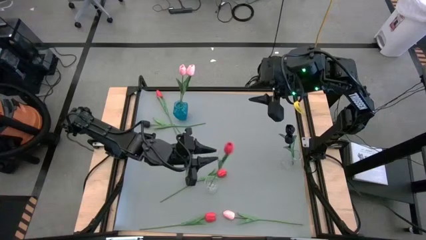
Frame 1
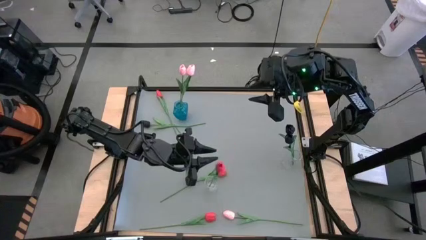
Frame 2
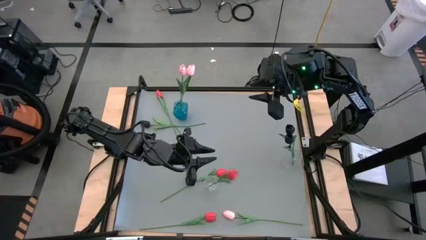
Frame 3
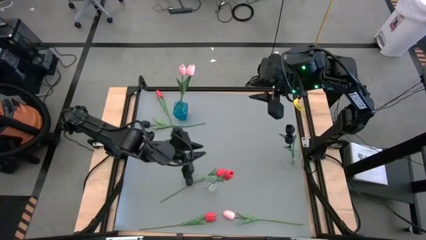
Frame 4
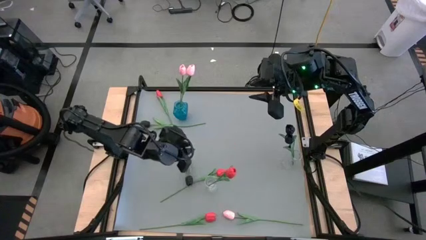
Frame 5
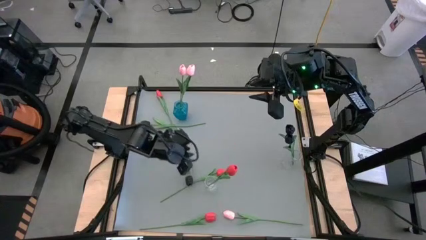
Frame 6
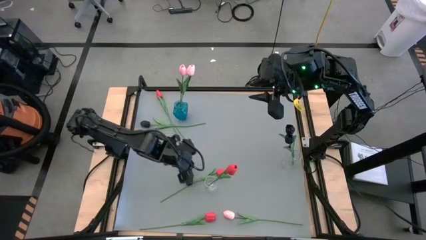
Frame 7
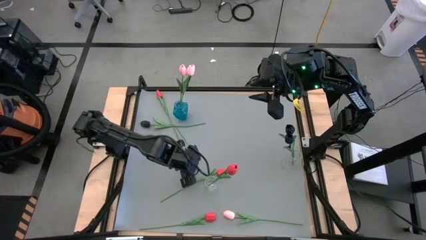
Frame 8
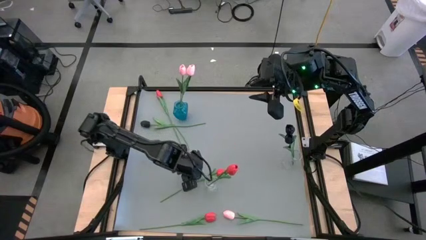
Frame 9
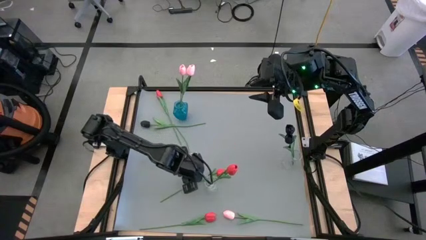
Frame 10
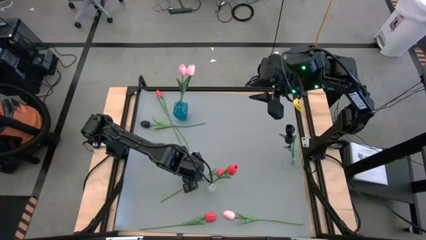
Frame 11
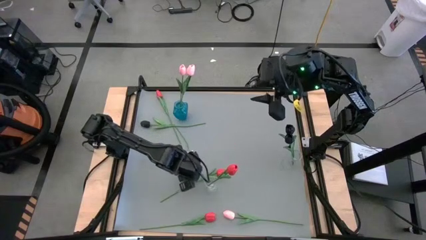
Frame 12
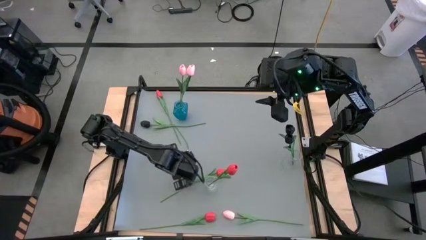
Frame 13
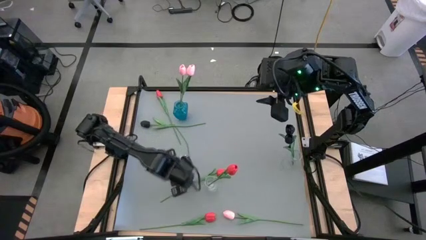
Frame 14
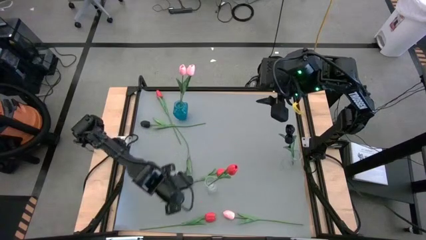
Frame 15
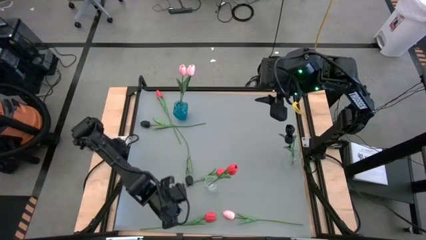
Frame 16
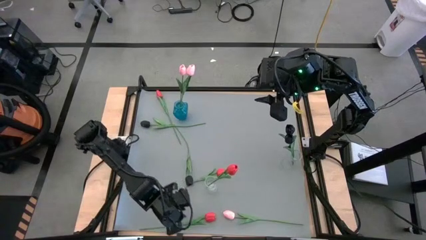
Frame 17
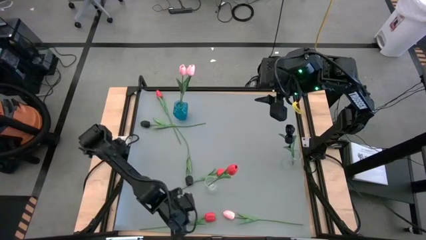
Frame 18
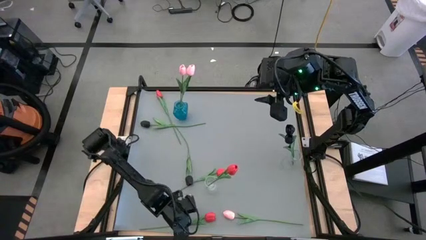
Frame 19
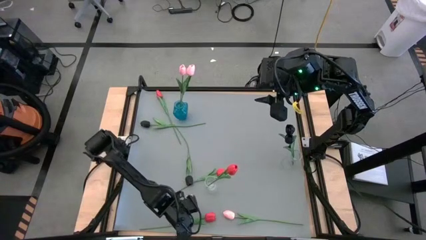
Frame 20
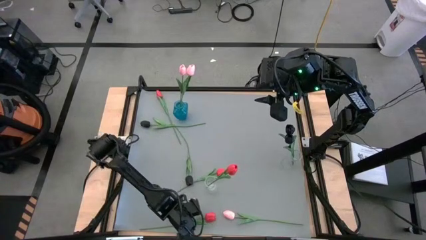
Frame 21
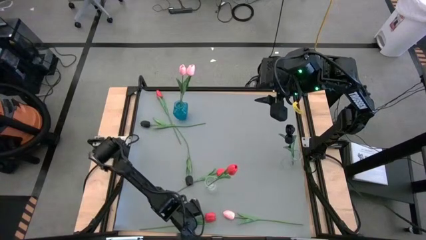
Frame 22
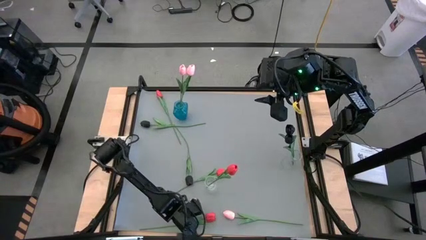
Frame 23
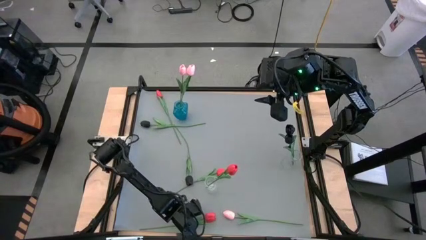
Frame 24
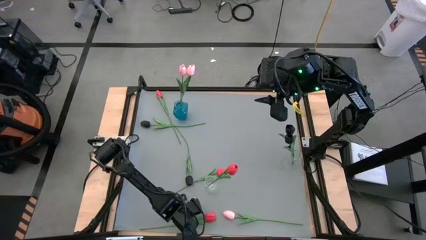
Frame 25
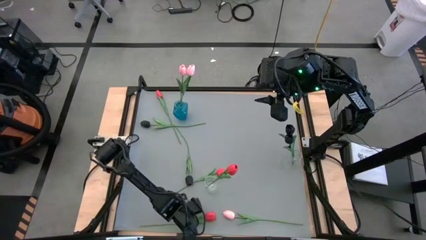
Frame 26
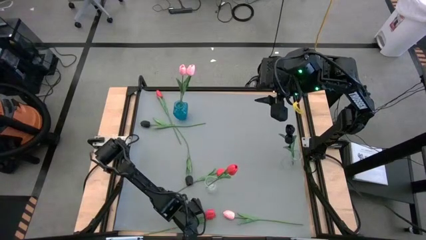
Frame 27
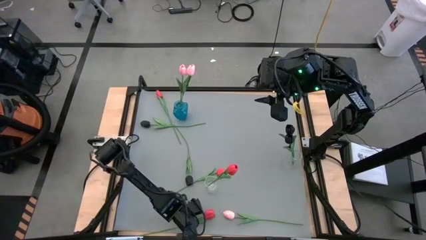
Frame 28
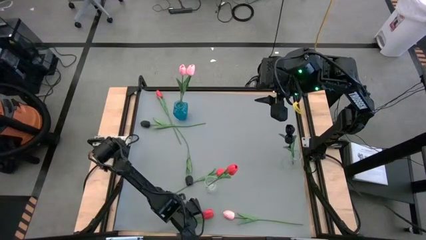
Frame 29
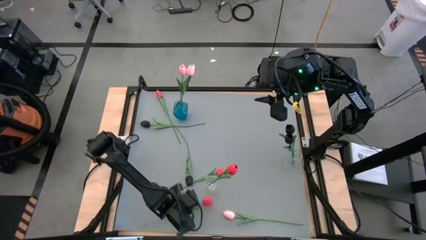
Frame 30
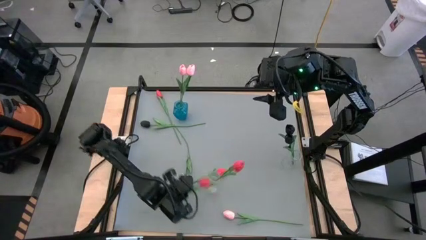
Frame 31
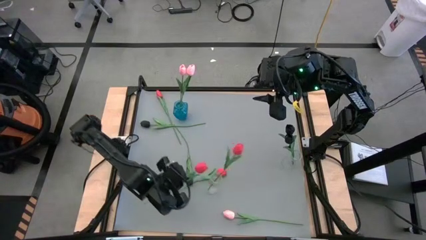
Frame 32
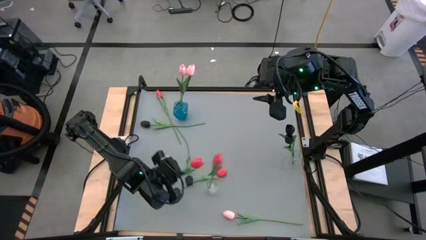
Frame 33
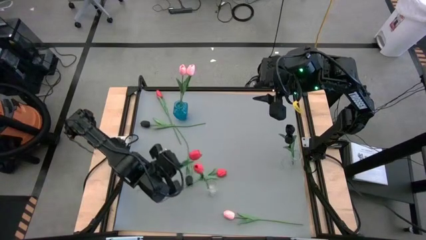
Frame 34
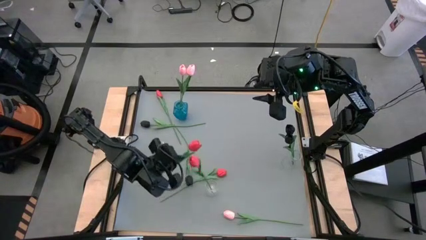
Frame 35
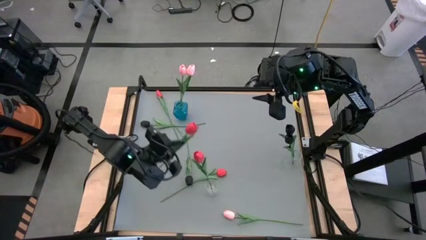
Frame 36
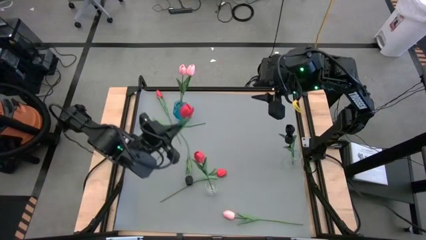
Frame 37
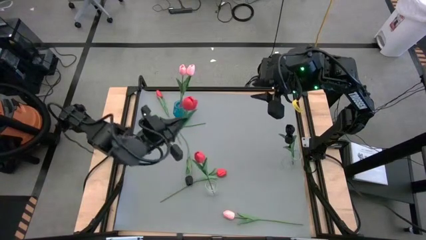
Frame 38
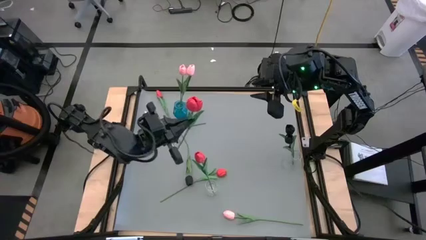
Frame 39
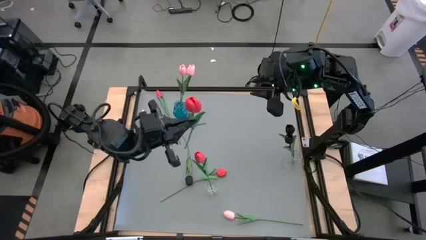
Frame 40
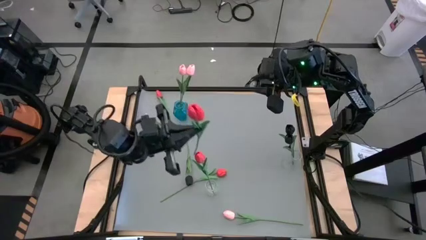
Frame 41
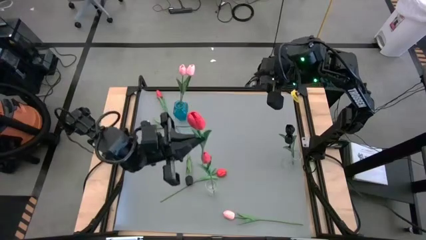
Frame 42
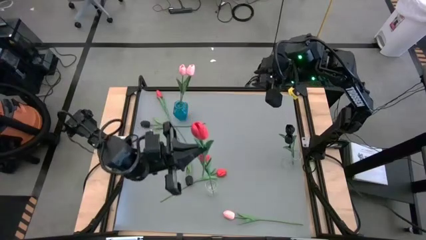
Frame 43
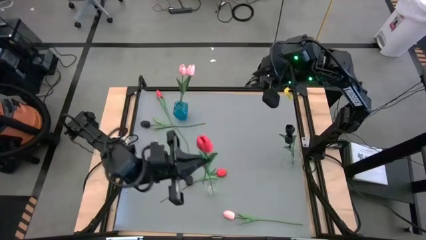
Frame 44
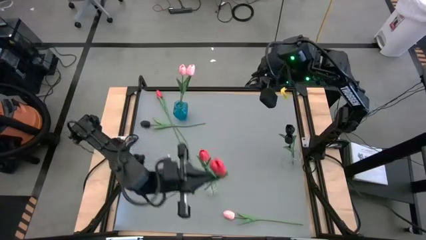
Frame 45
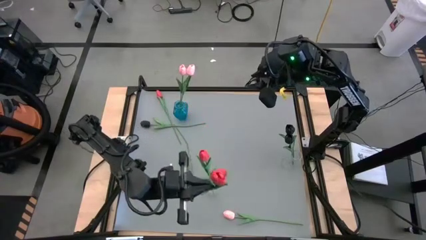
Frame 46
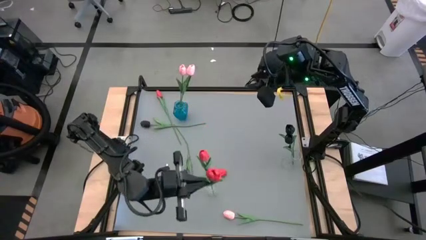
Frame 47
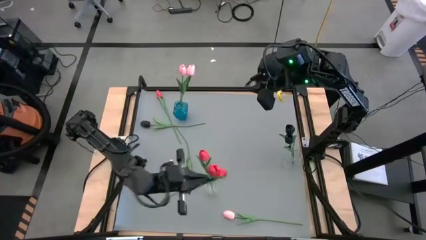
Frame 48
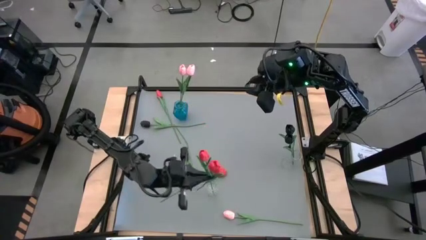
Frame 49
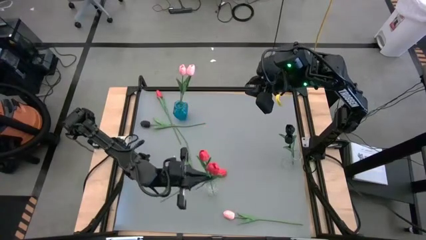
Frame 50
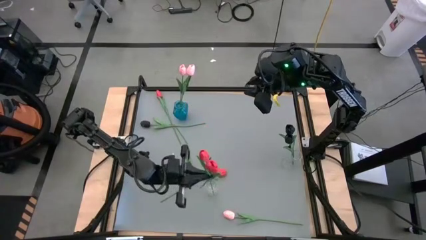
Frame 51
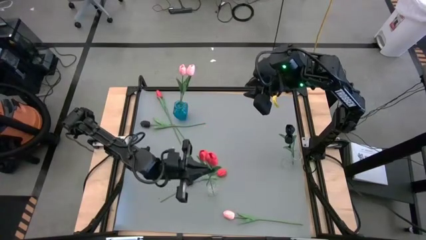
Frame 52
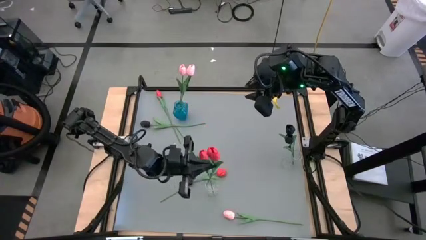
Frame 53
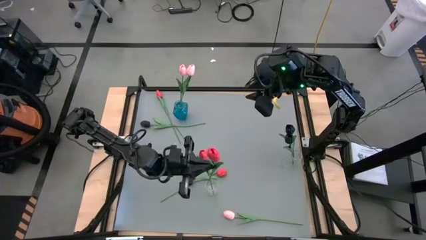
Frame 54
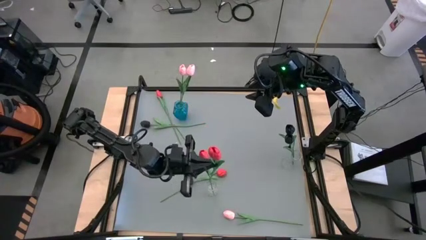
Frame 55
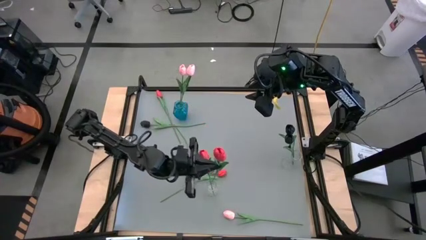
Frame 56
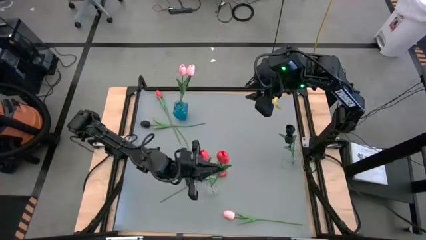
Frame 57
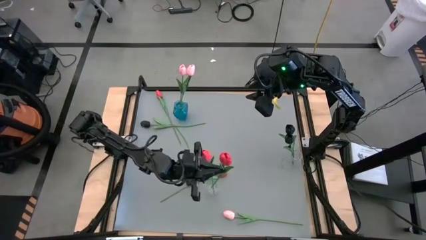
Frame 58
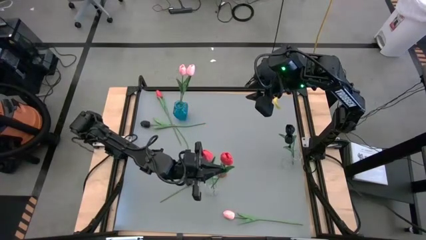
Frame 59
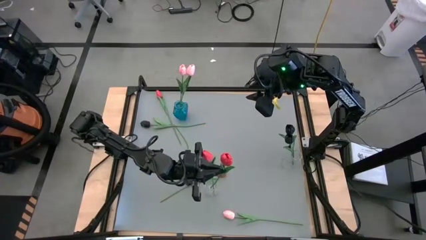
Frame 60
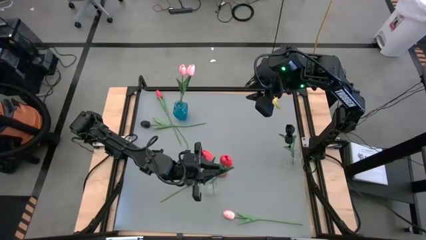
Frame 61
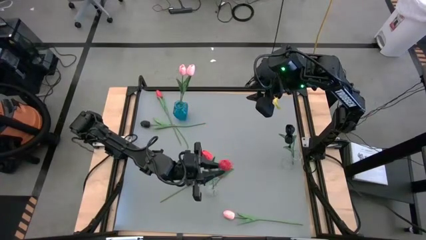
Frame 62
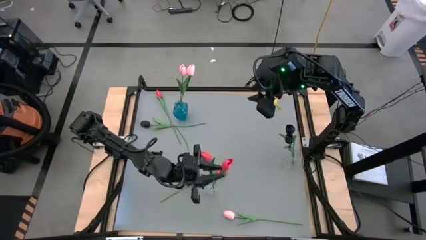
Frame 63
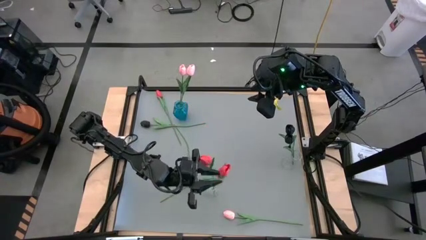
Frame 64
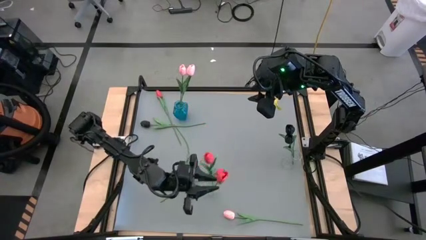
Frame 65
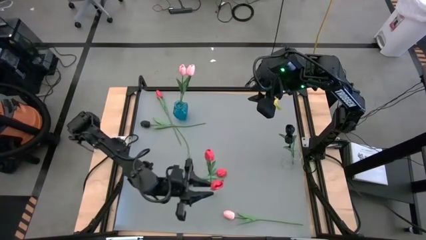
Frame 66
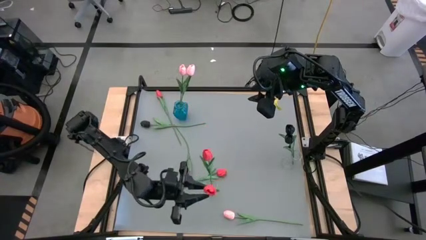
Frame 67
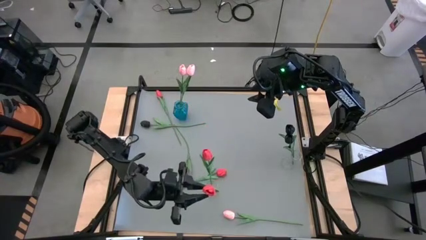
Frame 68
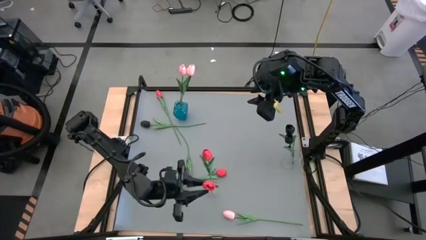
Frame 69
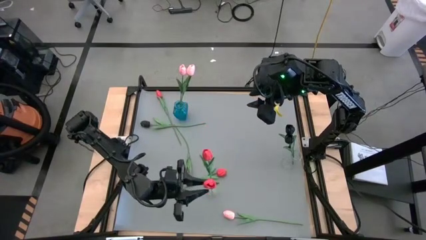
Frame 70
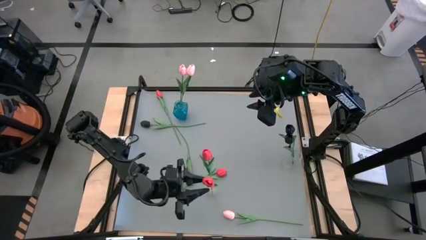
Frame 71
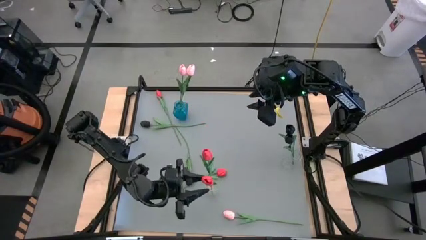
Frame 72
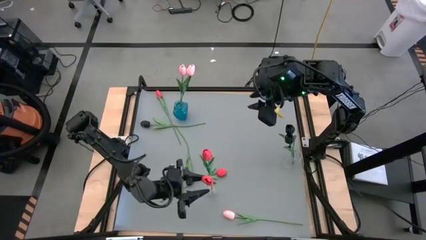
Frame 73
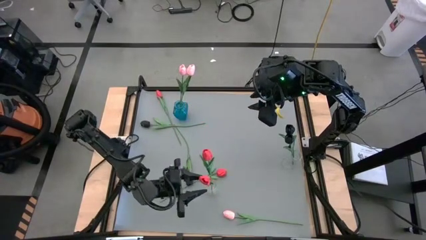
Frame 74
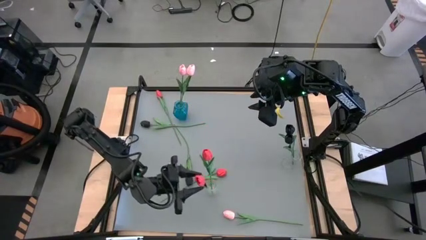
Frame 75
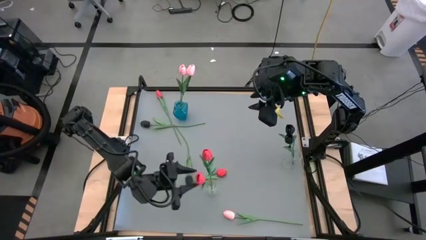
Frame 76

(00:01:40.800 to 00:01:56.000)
Task: Sort flowers into vase by color
Put the red flower into the left transparent vase
